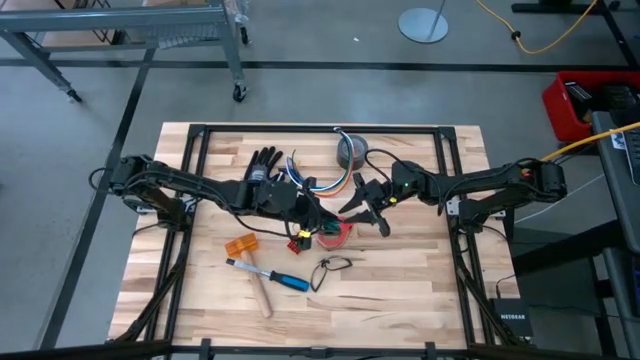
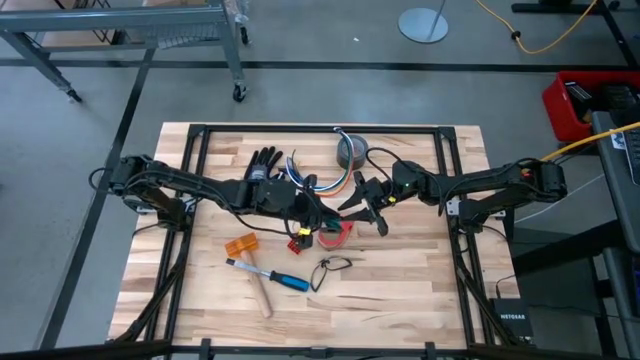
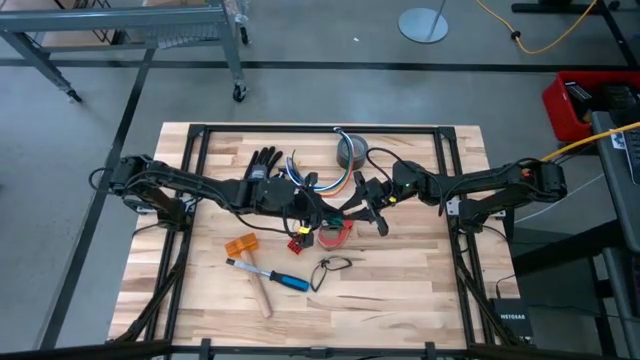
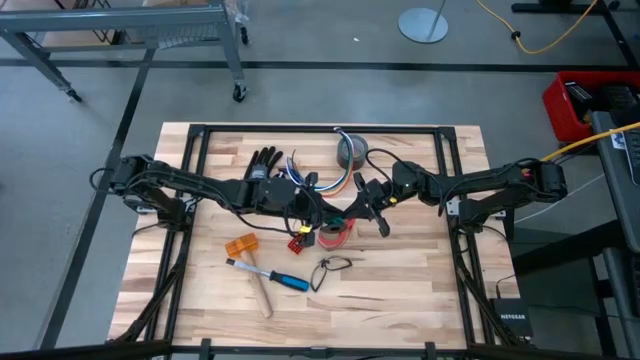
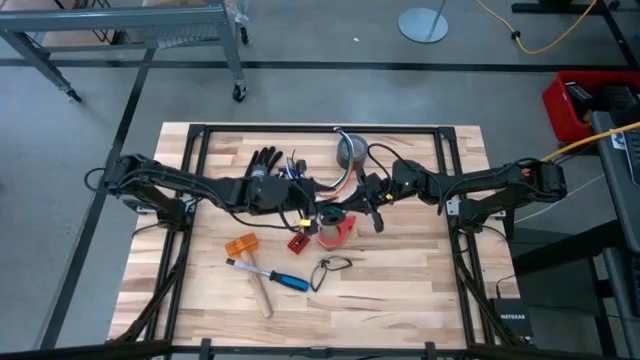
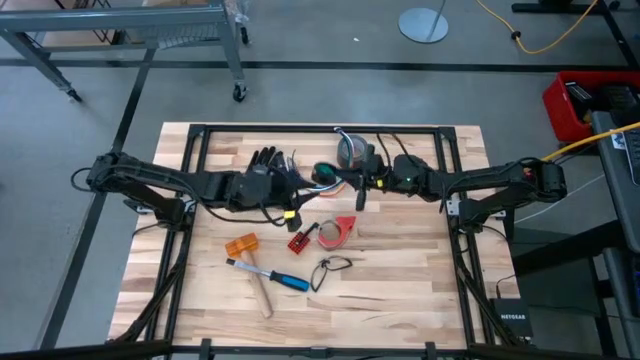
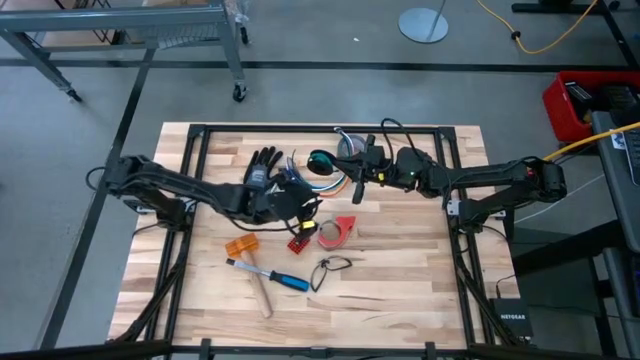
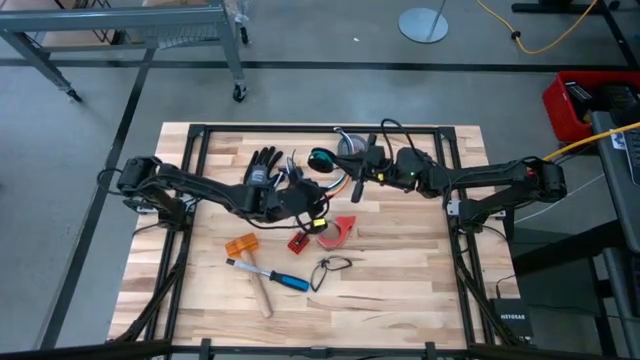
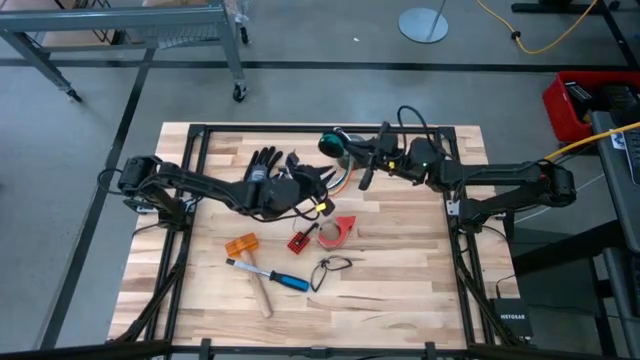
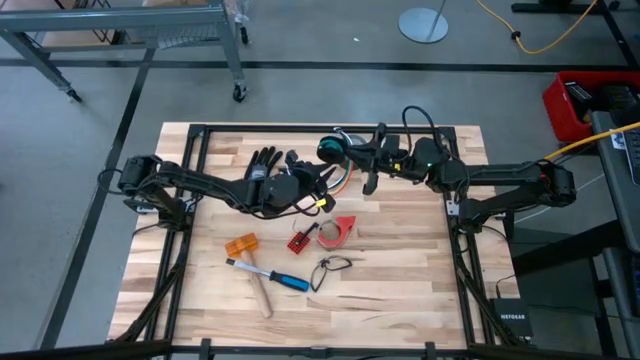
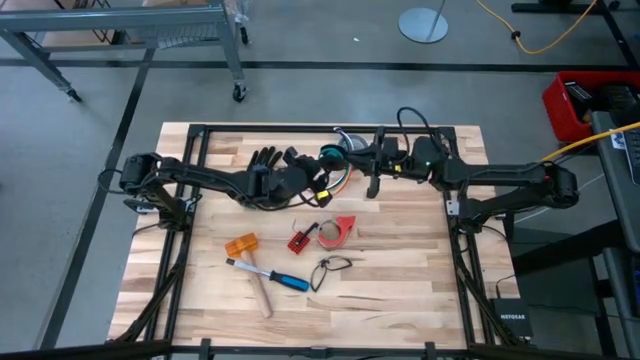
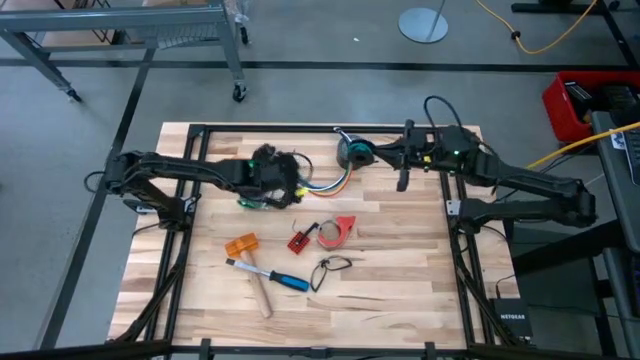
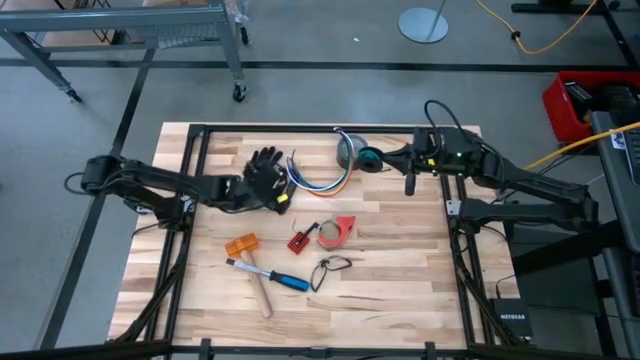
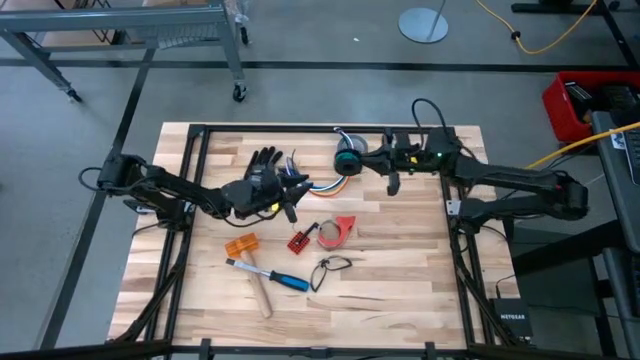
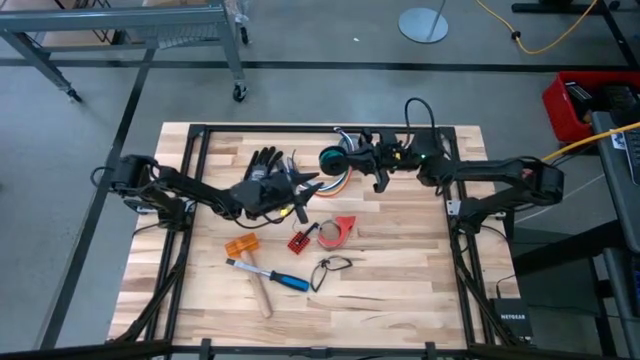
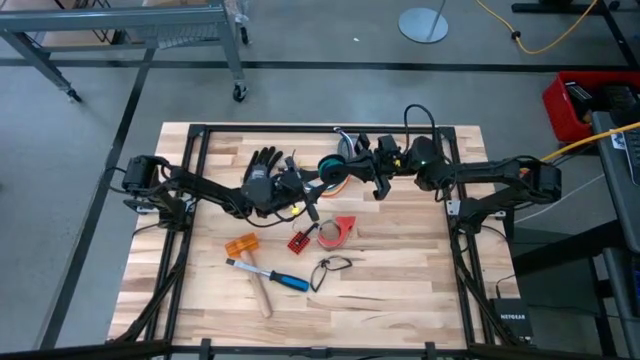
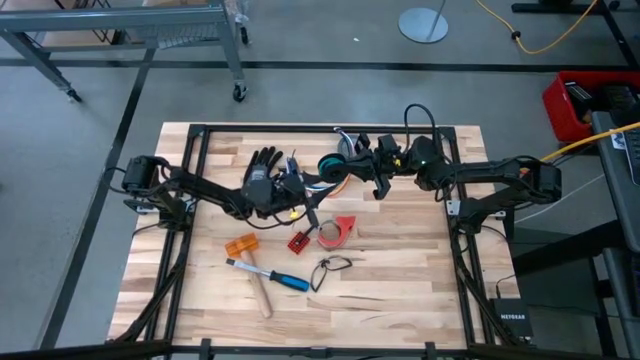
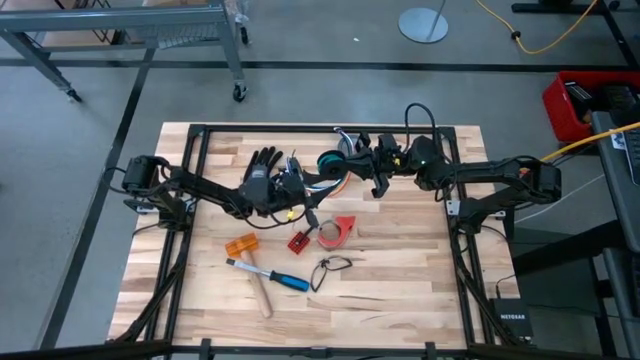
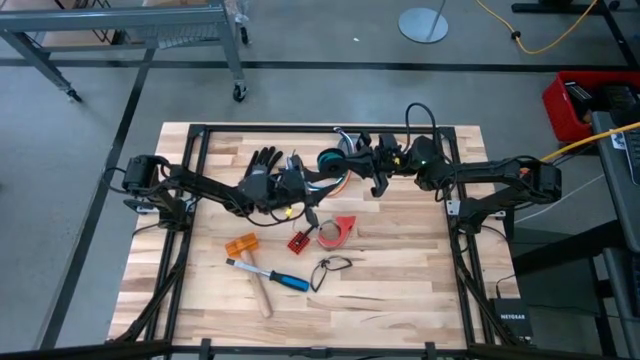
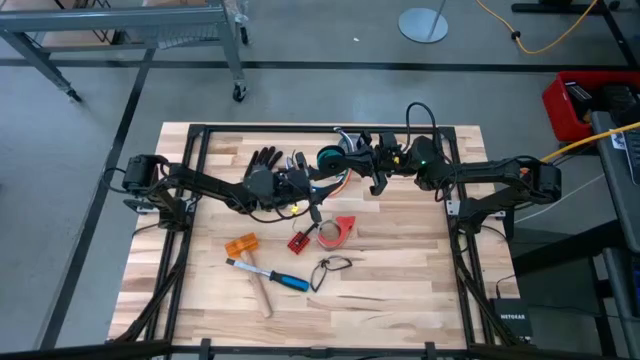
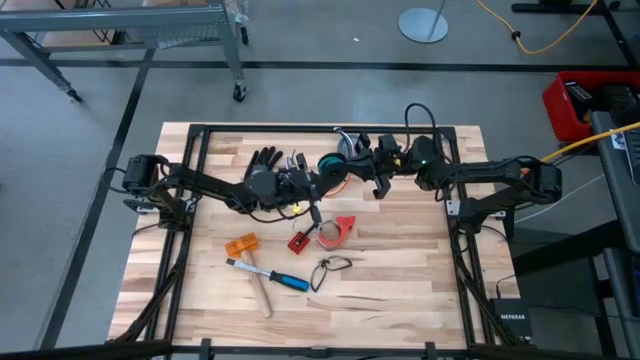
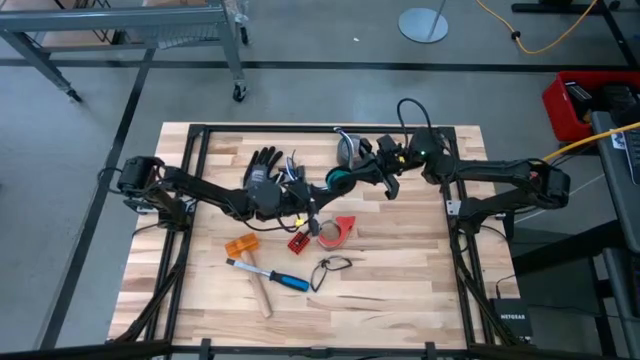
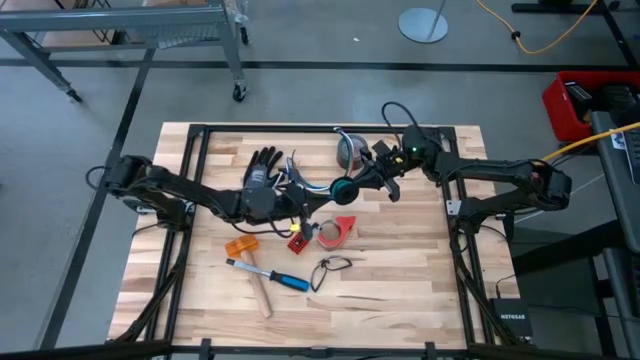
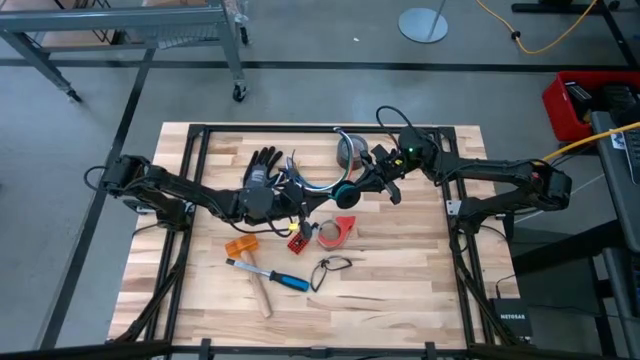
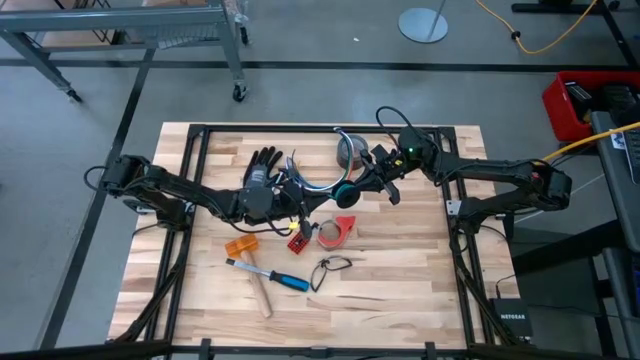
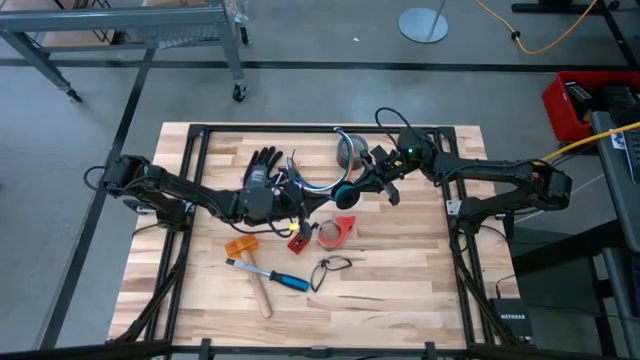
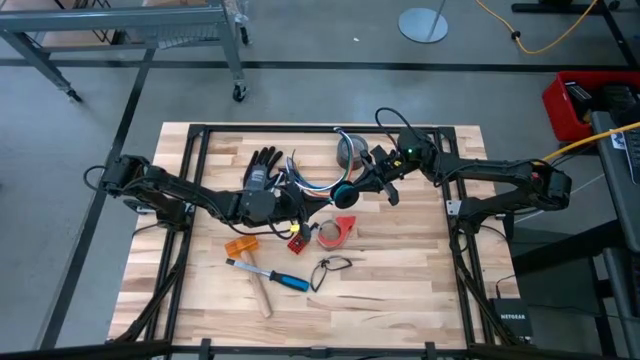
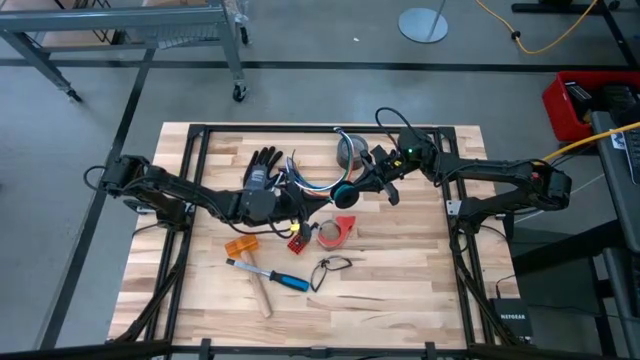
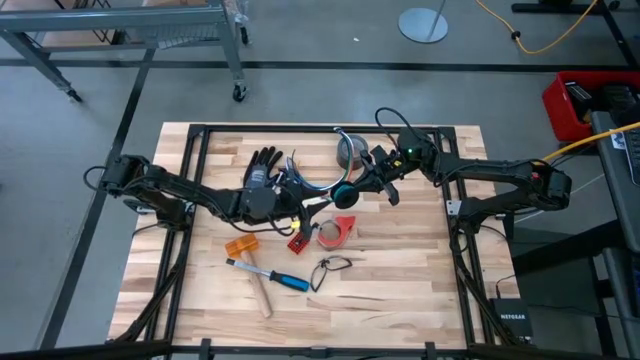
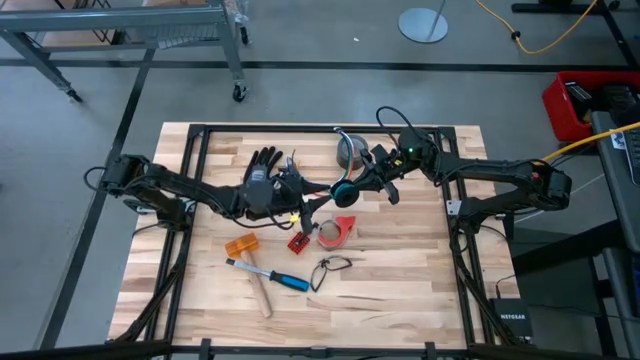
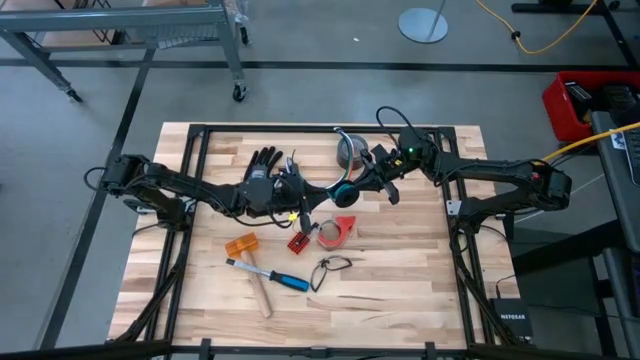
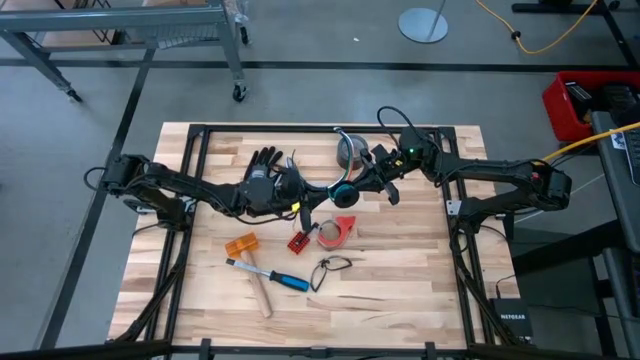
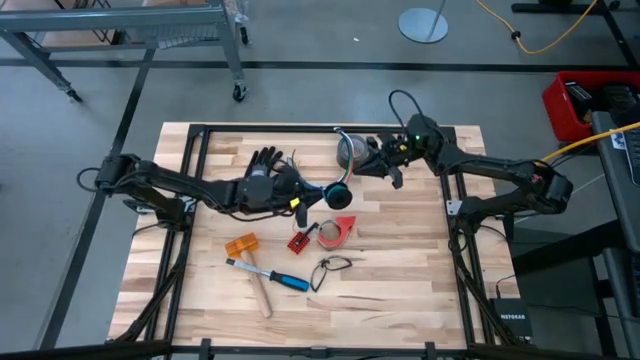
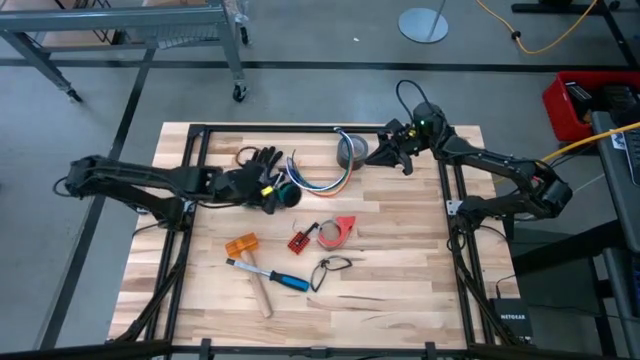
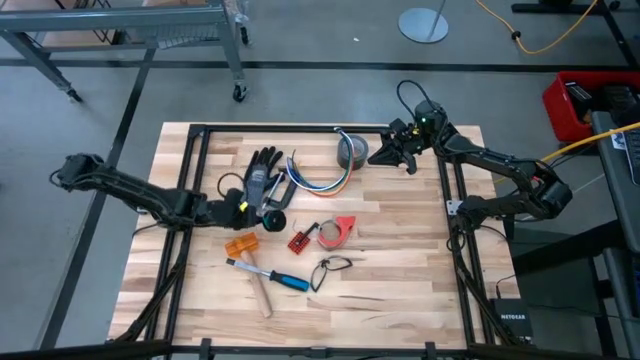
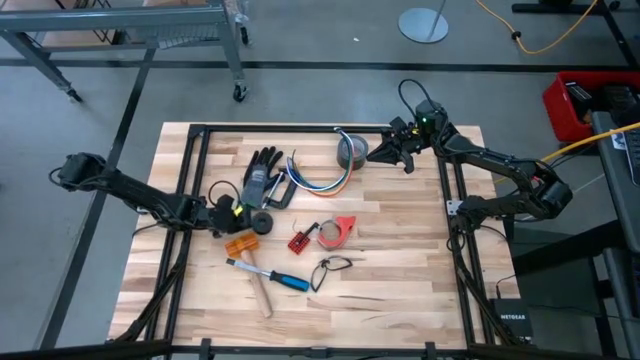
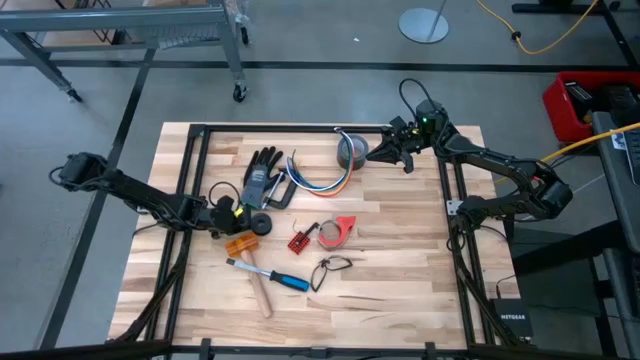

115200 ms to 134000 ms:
Task: Coil cords
Coil the wire onto the spool
